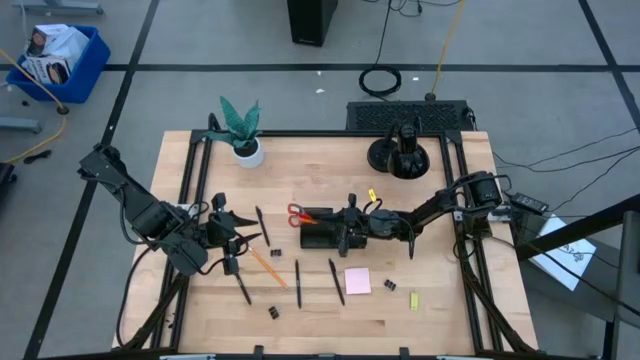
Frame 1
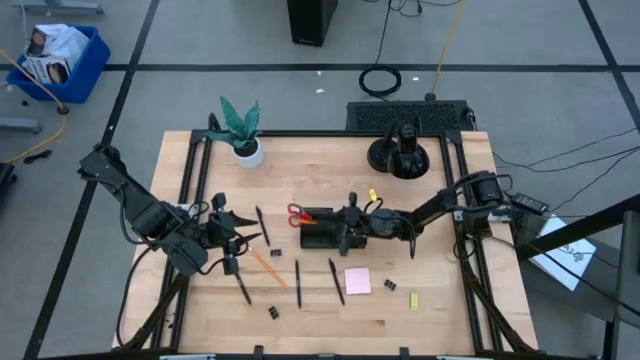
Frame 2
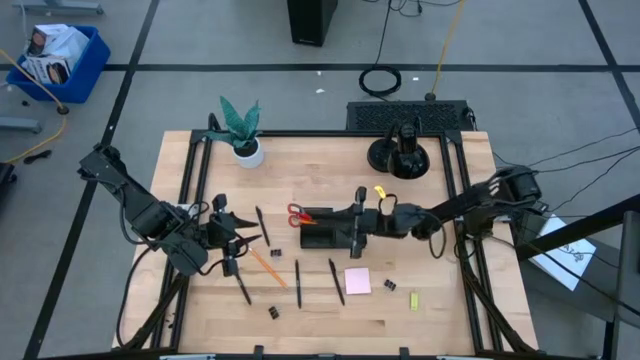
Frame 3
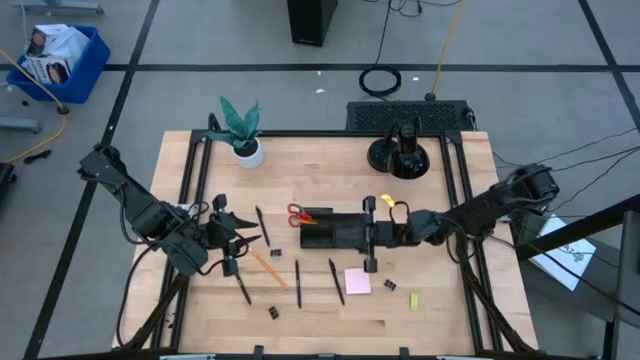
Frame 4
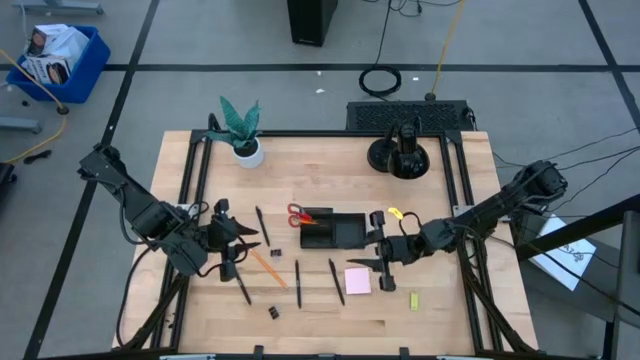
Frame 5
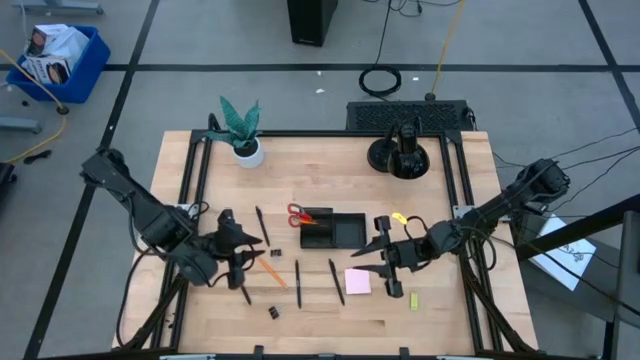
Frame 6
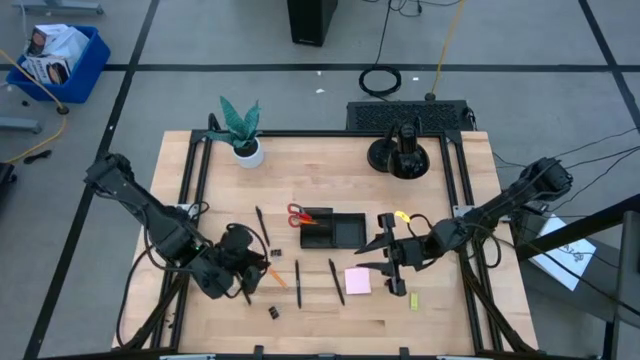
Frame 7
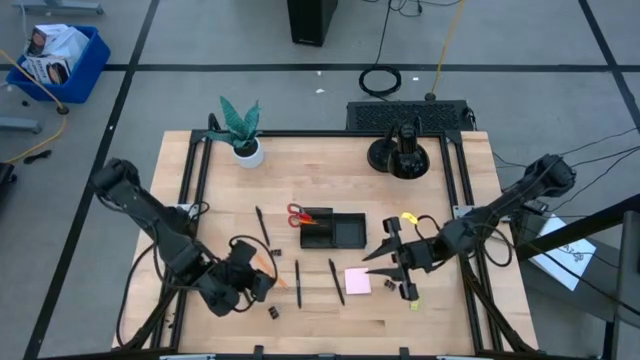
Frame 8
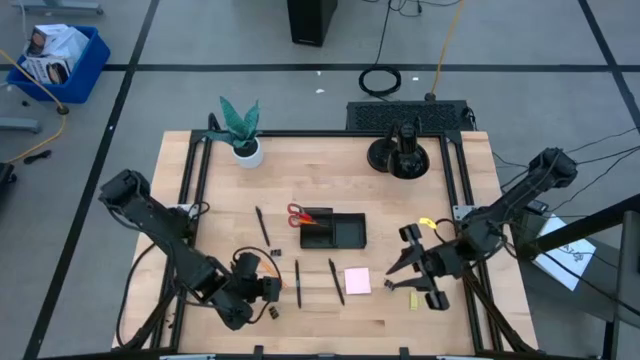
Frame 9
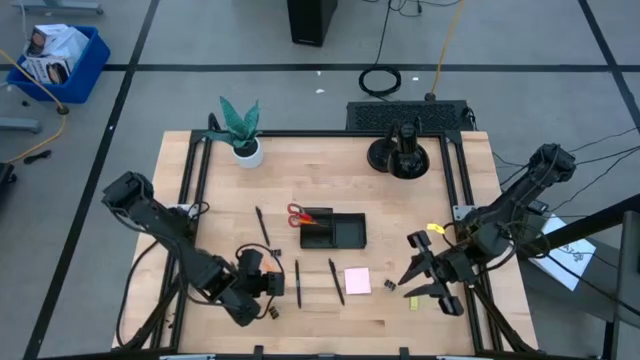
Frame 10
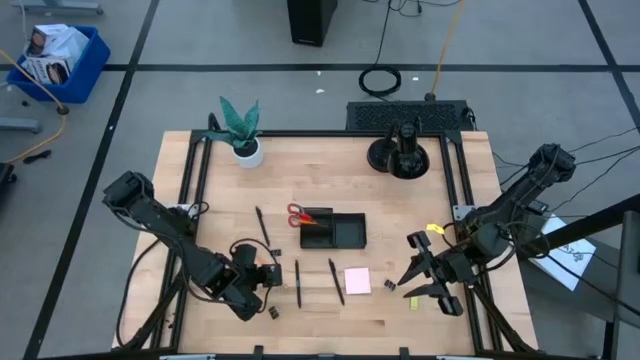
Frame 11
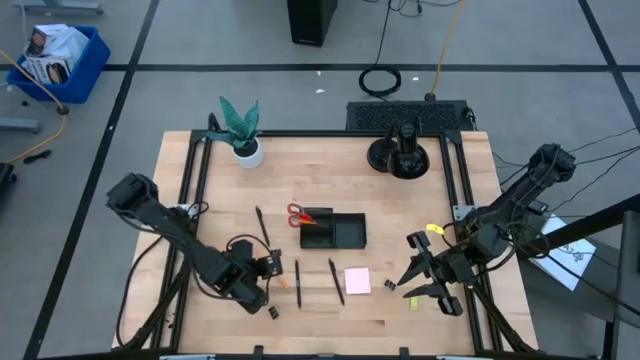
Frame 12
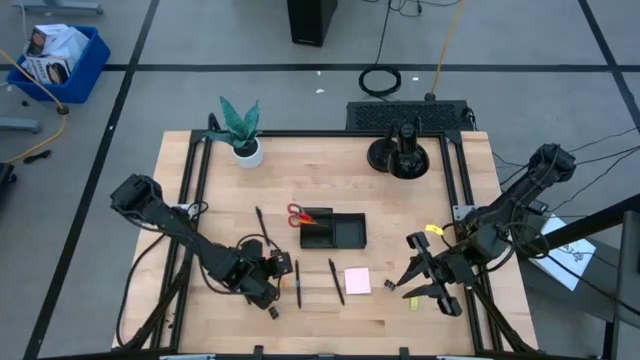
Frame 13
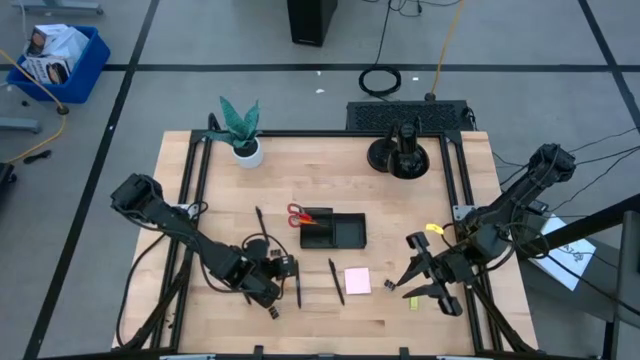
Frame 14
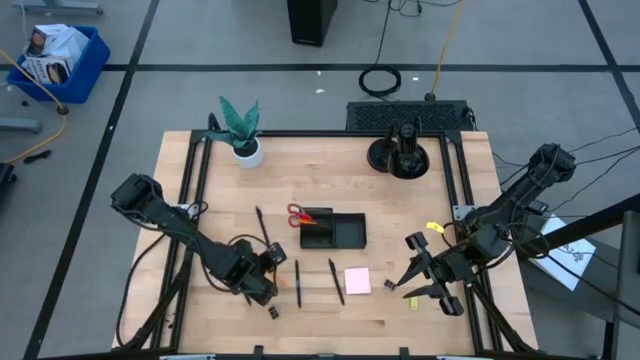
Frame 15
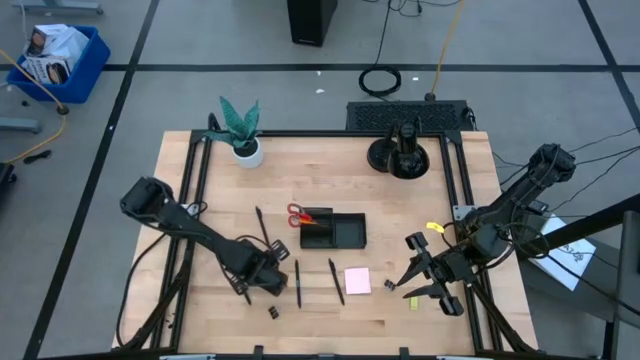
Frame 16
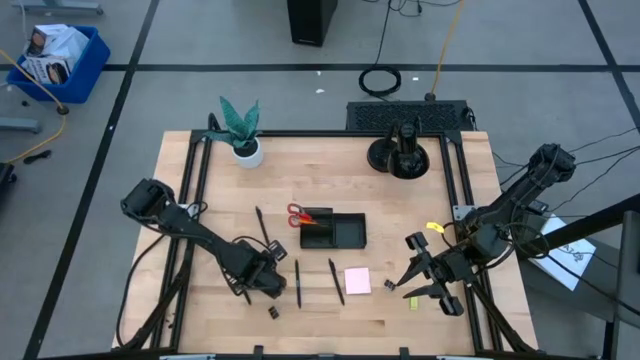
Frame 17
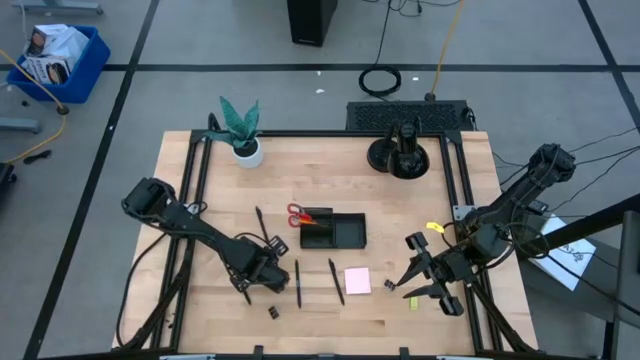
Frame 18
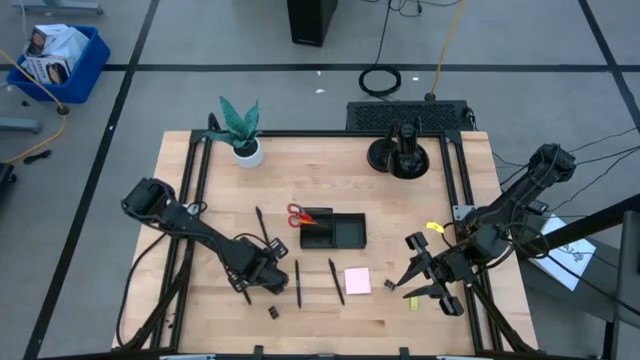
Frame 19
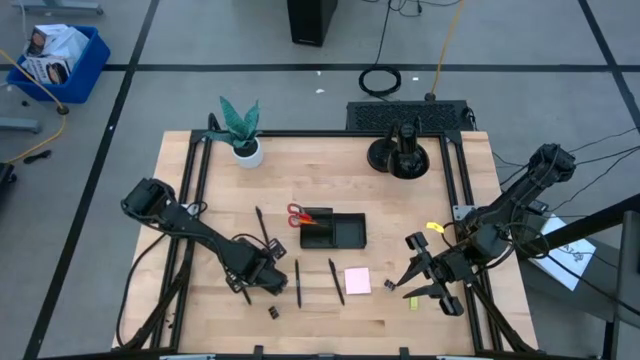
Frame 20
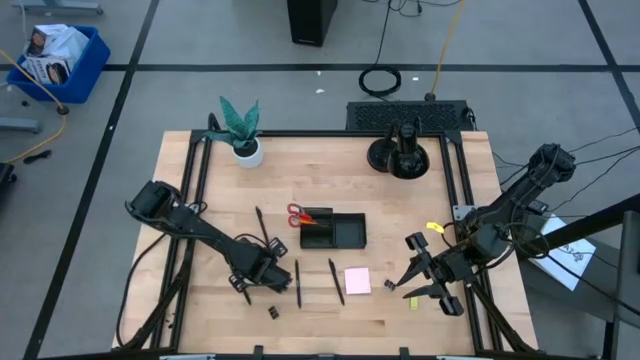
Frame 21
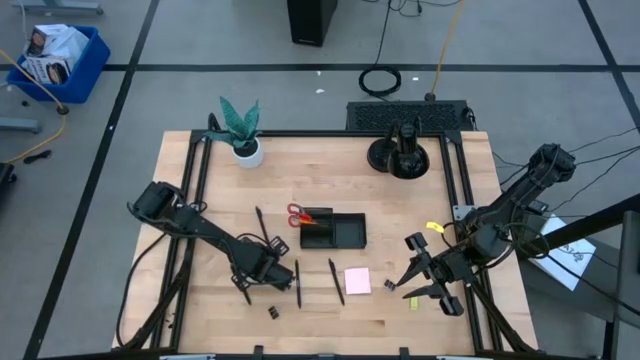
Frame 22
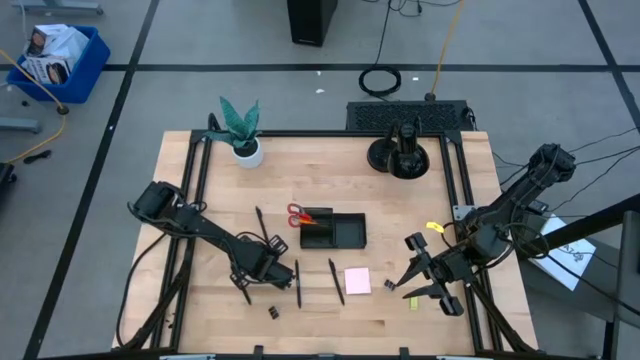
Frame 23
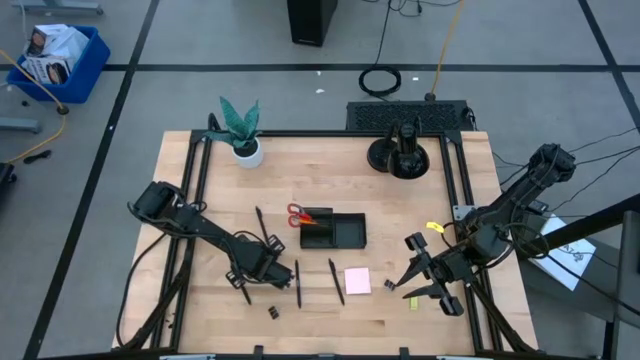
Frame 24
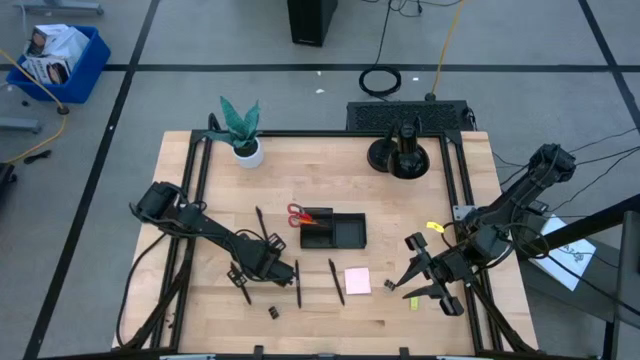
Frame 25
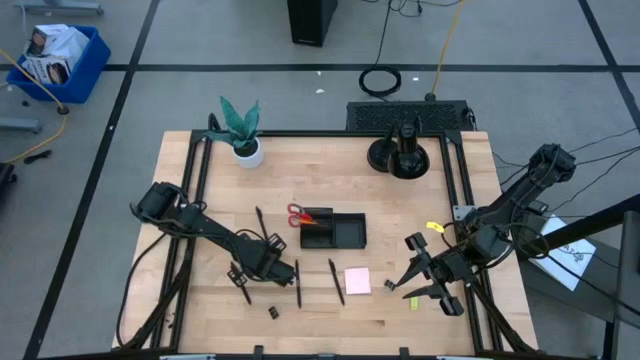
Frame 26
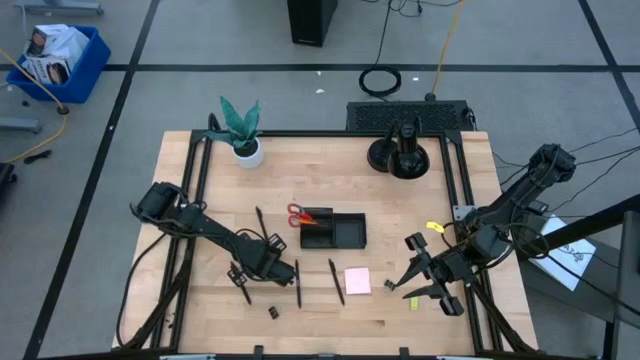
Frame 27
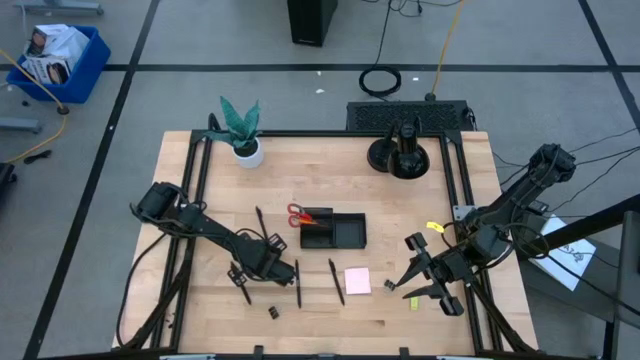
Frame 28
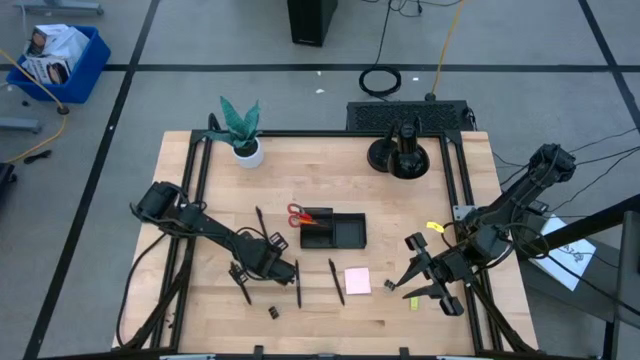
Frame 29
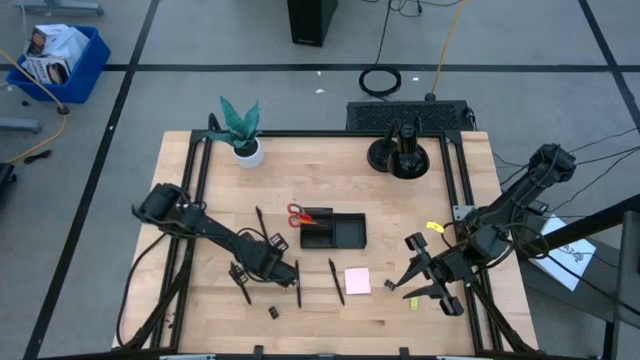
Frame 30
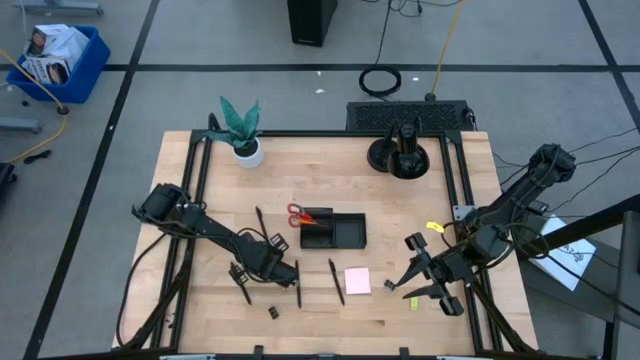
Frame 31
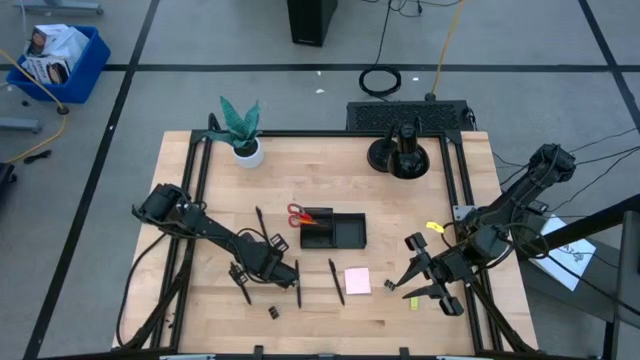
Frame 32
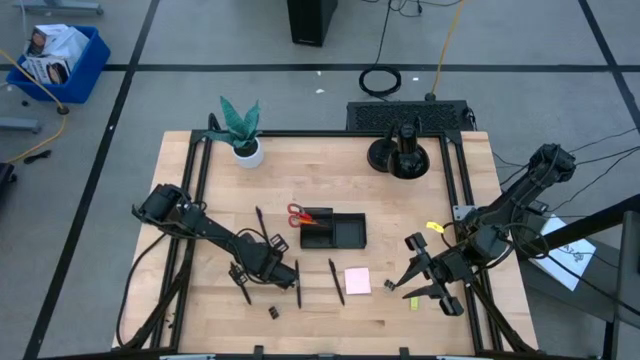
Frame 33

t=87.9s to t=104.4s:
Task: Pick and place office supplies into organizer
Put the orange pencil into the desk organizer

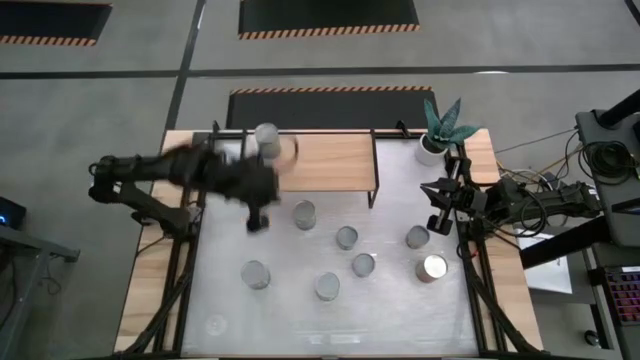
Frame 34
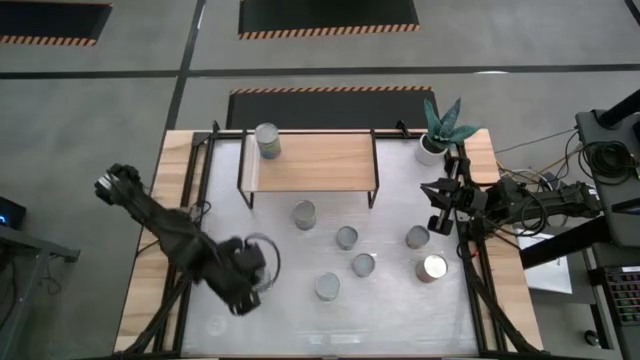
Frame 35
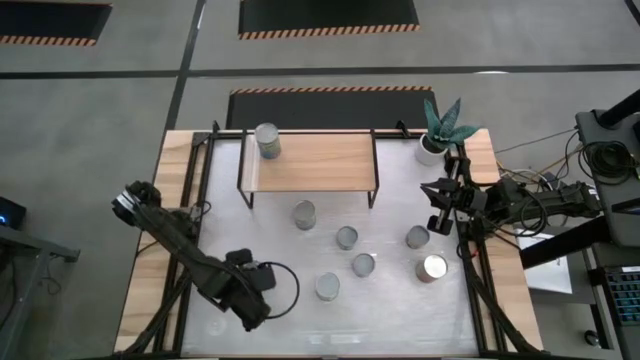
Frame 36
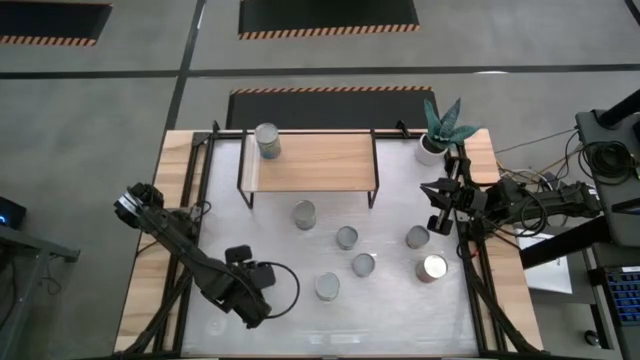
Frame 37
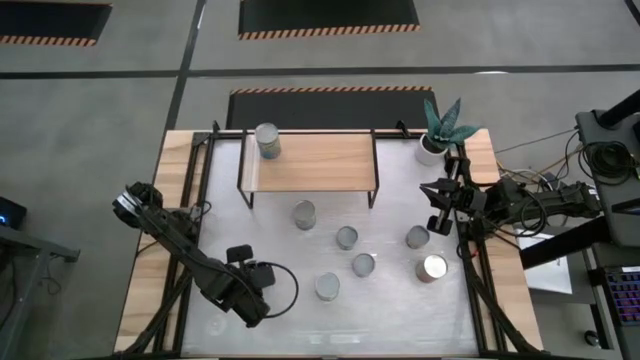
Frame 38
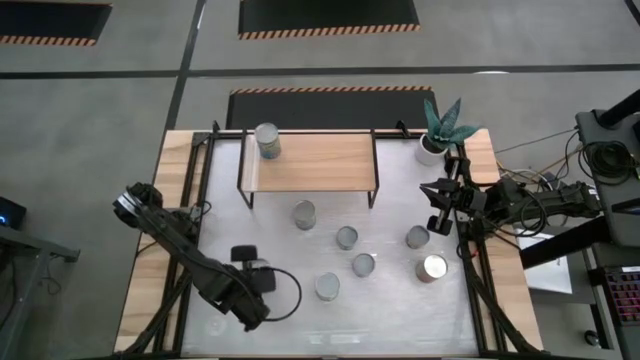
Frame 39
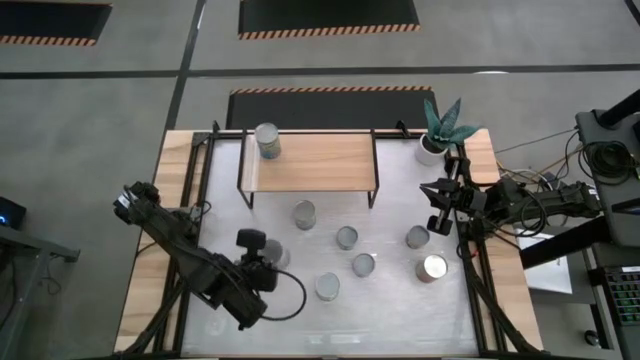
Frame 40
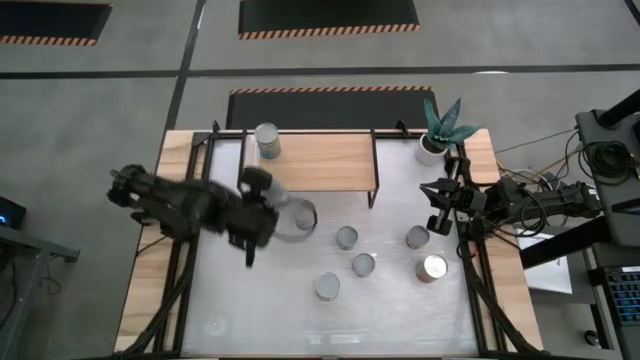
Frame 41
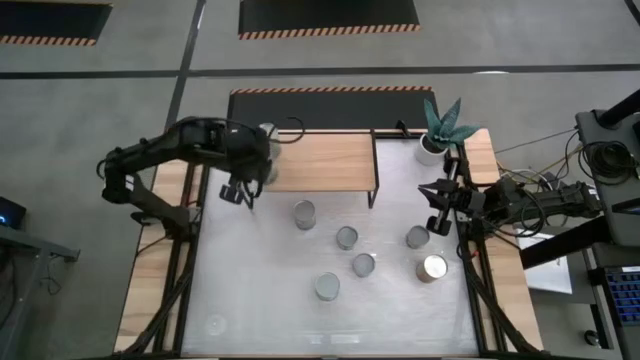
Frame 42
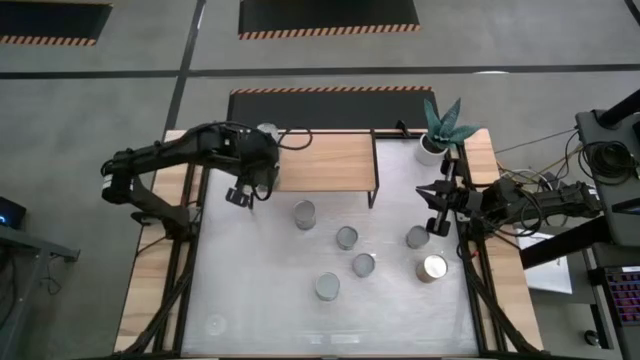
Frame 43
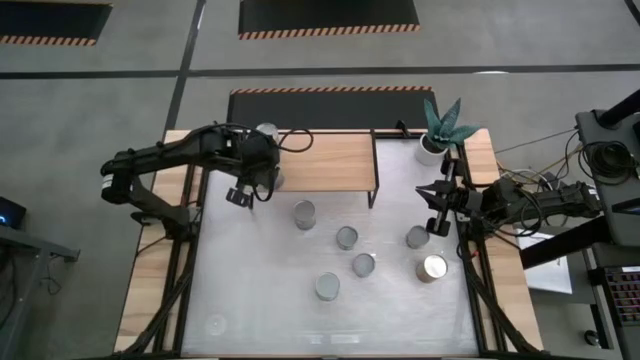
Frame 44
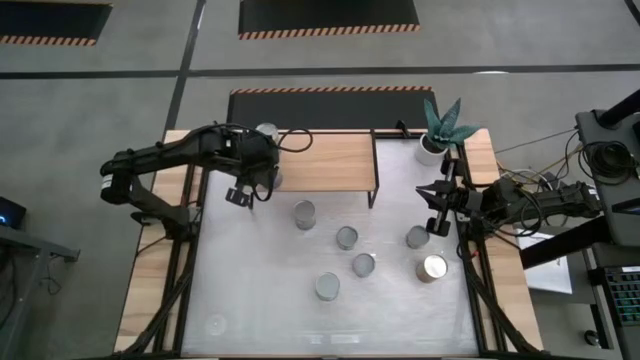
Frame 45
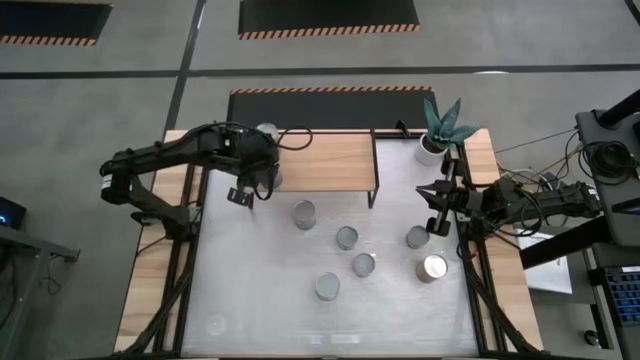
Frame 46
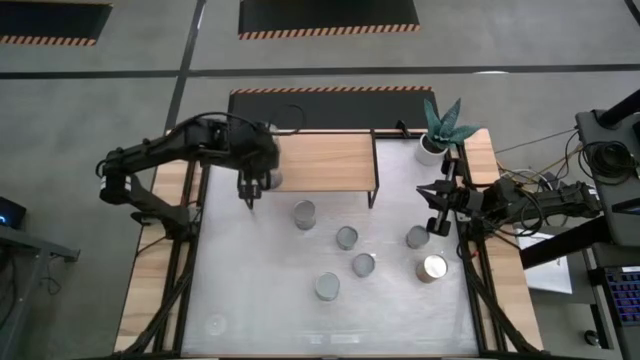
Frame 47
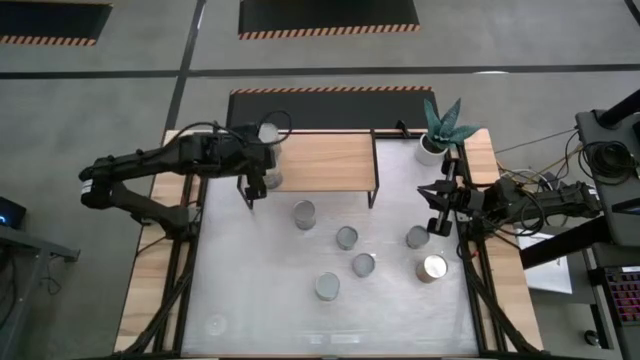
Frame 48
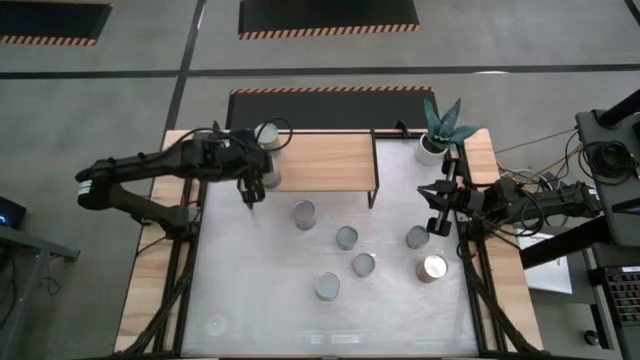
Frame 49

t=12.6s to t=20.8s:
Task: Pick and place cans onto a shelf
Put the bottom large canned peas on the shelf
